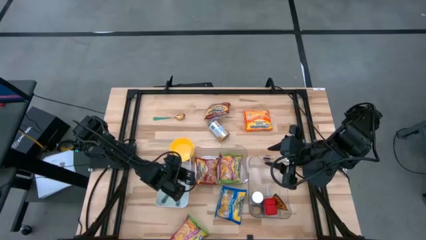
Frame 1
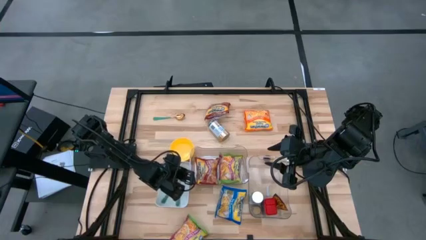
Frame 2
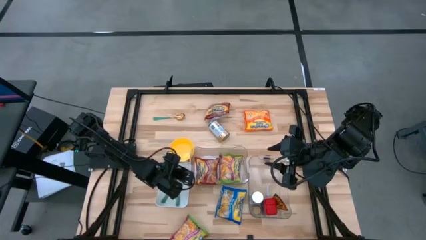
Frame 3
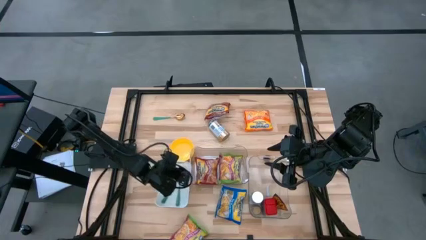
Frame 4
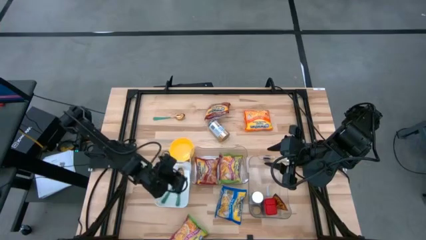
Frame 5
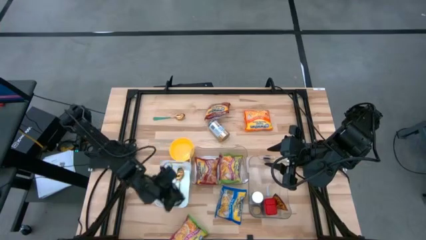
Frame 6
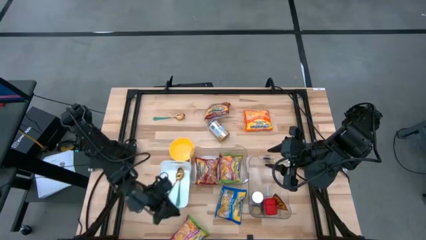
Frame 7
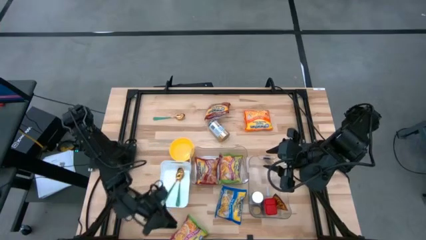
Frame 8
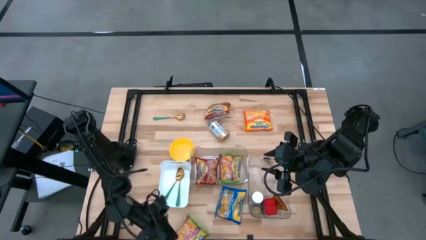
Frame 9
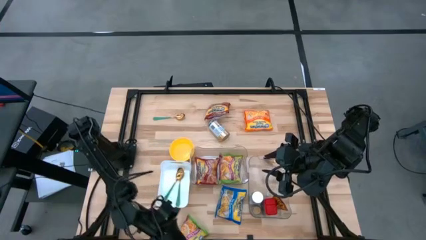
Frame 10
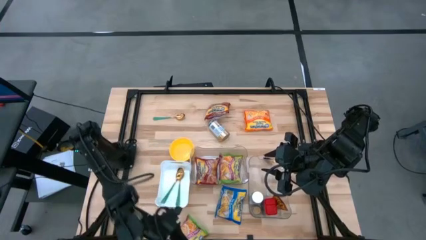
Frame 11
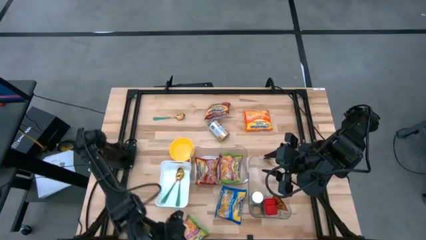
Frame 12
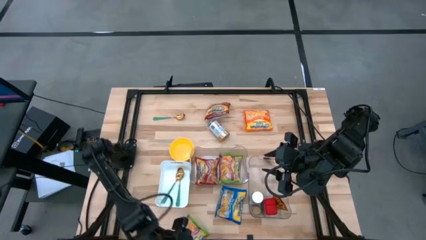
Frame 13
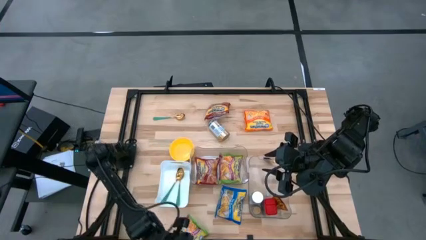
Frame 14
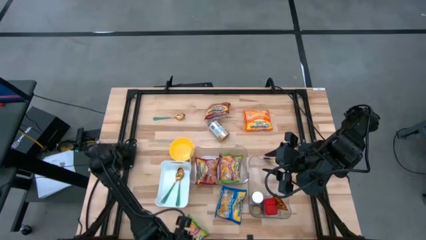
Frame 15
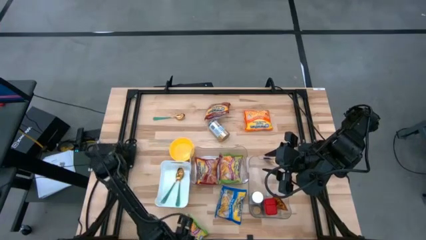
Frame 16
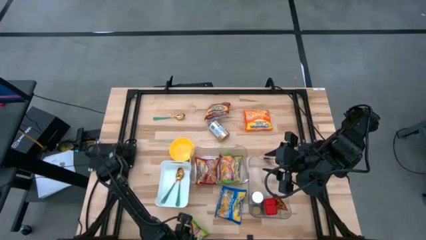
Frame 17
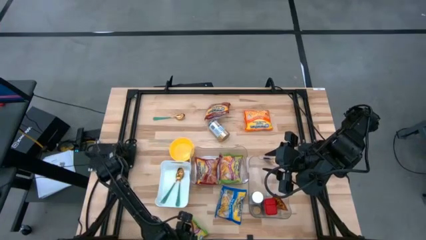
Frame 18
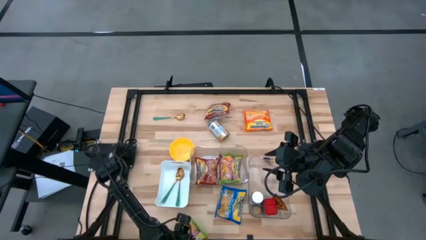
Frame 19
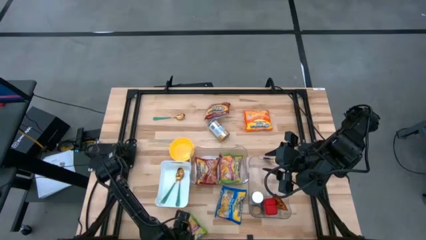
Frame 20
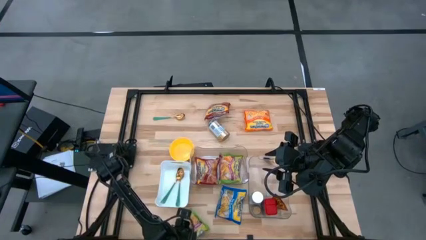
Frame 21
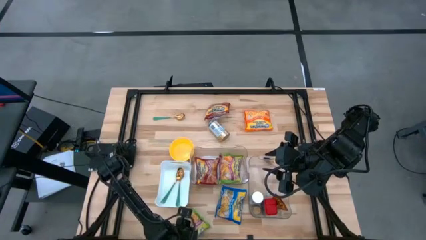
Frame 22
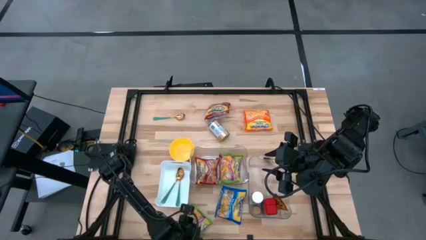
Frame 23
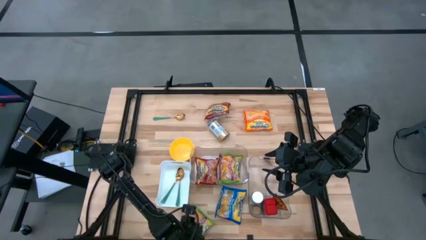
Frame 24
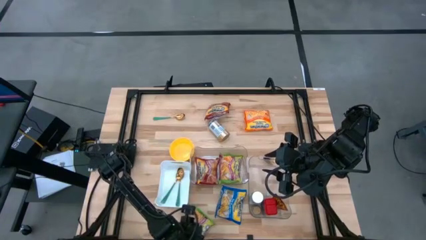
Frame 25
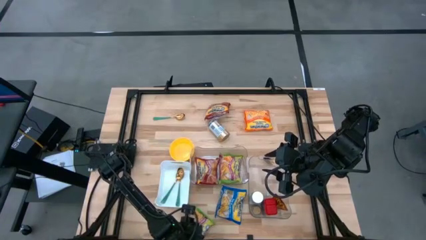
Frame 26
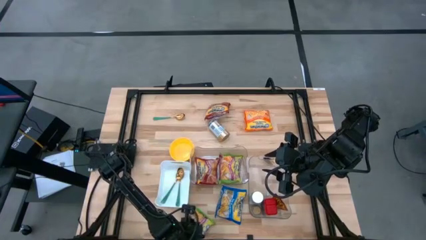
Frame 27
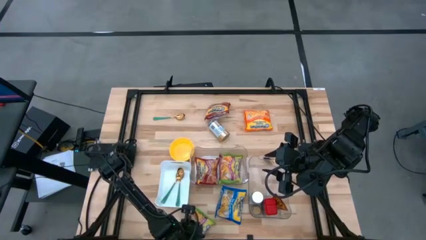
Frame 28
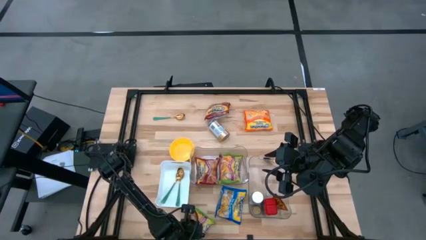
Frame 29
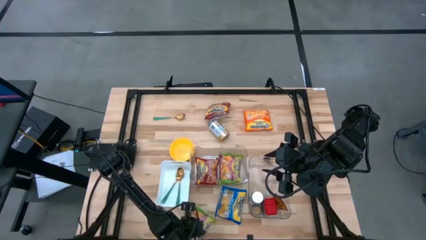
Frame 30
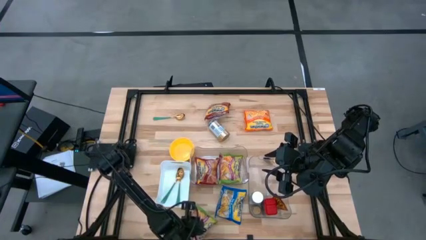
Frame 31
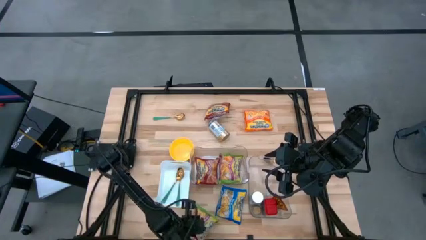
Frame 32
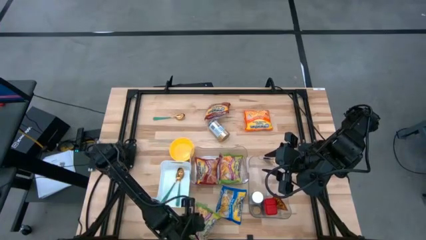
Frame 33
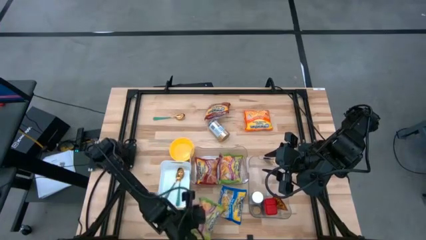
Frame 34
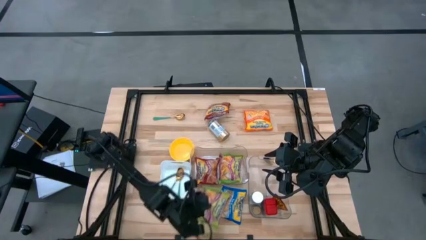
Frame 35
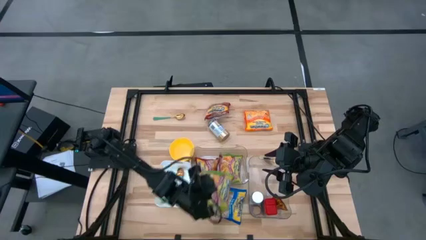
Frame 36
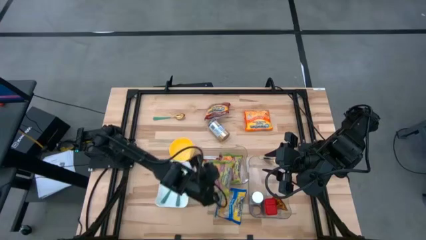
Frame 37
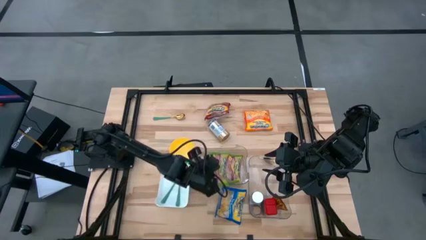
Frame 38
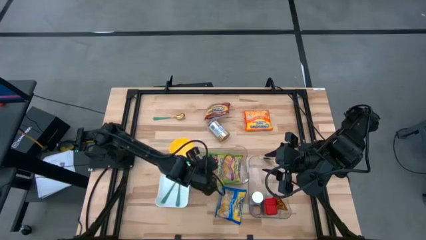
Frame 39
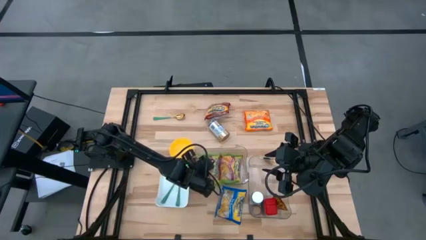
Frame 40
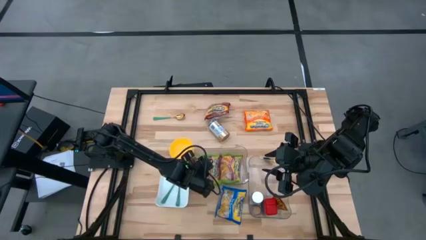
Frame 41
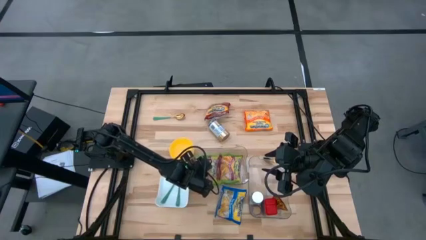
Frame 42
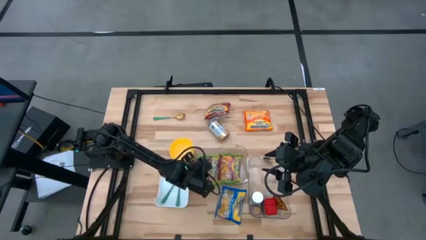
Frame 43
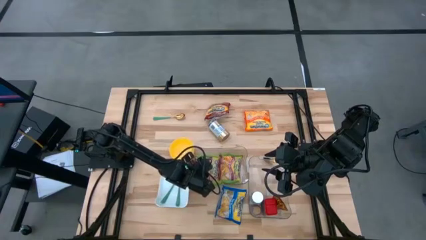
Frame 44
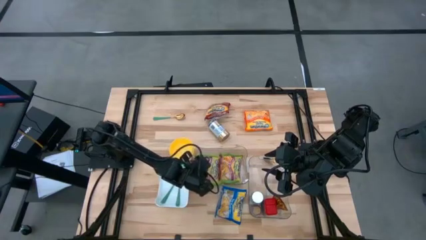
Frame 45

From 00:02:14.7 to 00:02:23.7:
Task: Pick & Place Food Item
Put the green noodle pack into the left transparent bin

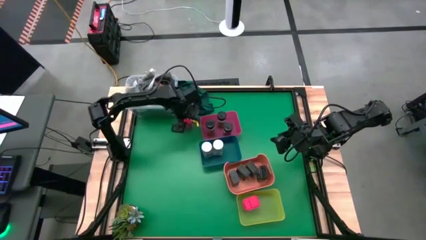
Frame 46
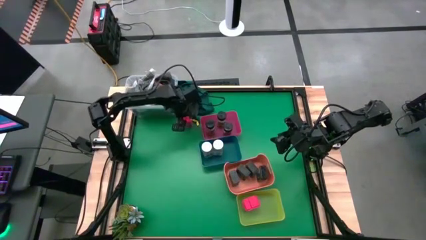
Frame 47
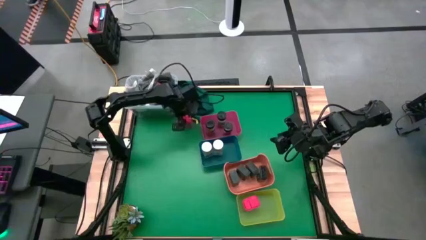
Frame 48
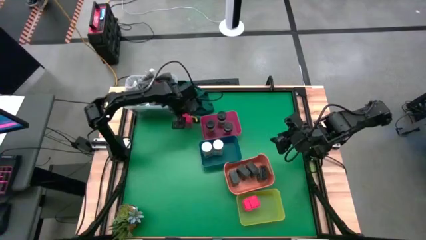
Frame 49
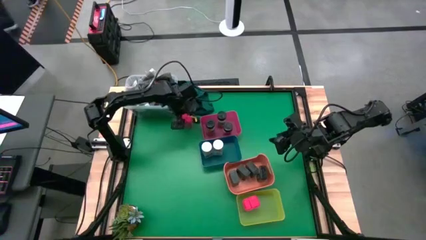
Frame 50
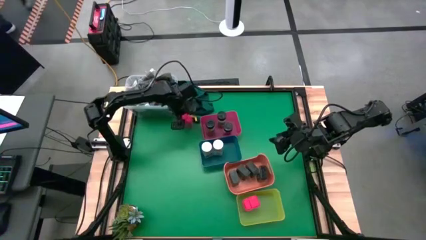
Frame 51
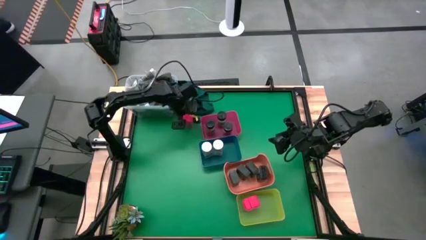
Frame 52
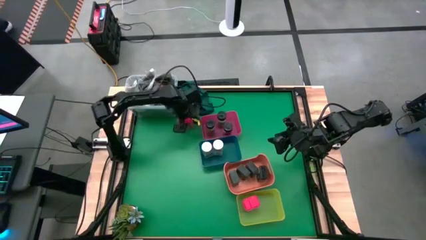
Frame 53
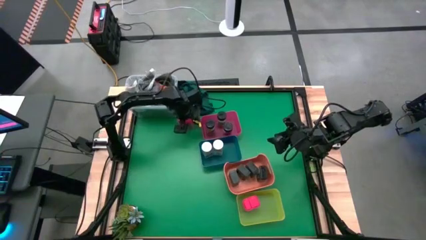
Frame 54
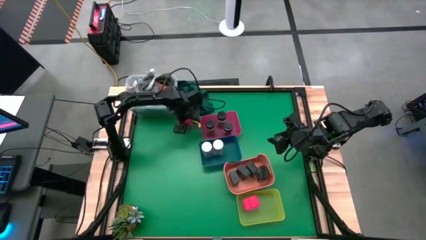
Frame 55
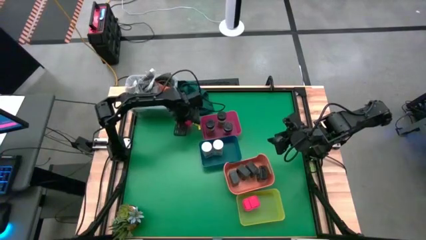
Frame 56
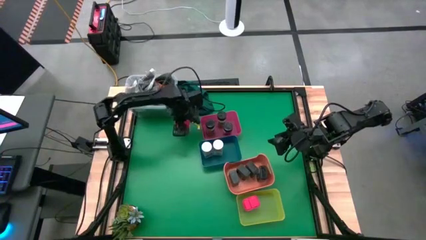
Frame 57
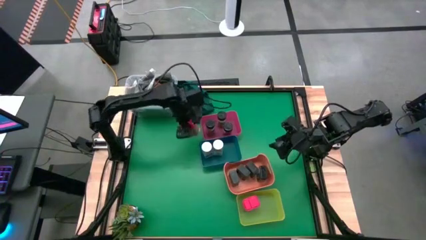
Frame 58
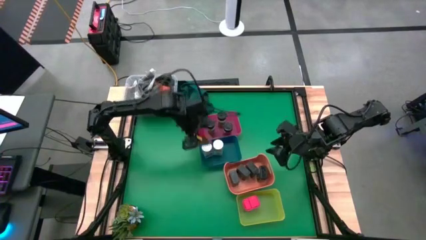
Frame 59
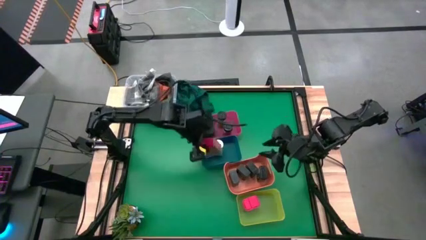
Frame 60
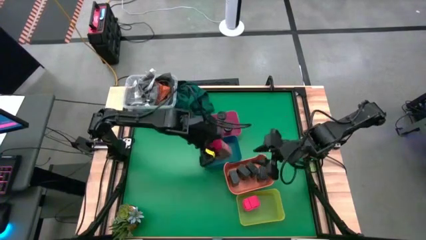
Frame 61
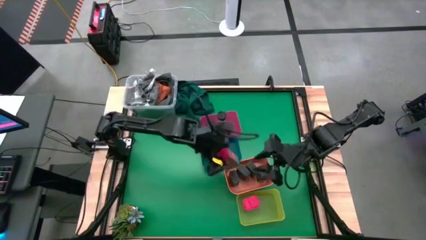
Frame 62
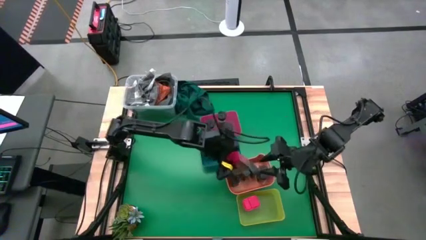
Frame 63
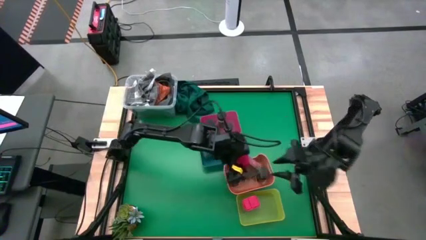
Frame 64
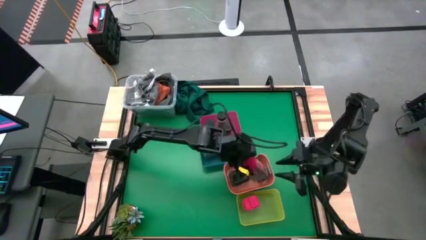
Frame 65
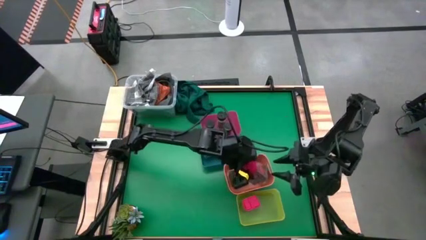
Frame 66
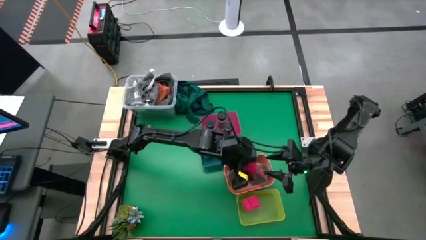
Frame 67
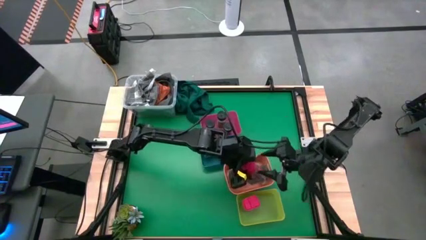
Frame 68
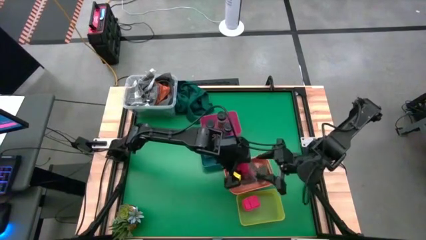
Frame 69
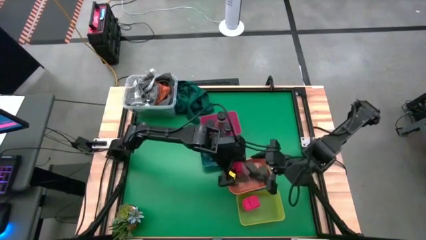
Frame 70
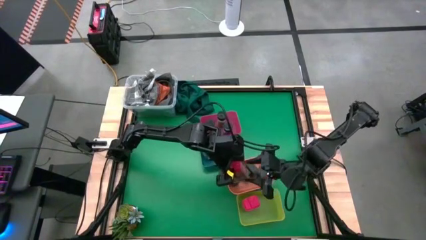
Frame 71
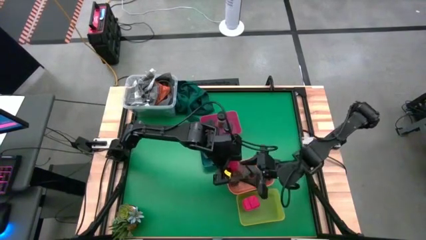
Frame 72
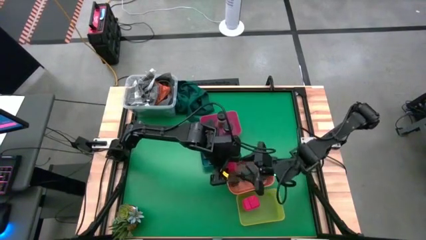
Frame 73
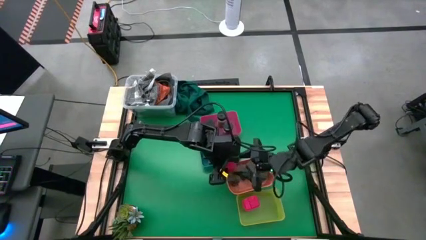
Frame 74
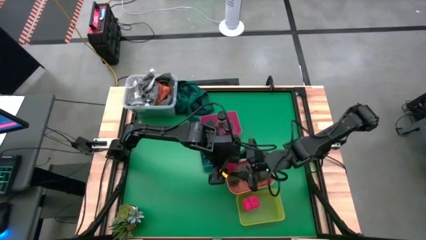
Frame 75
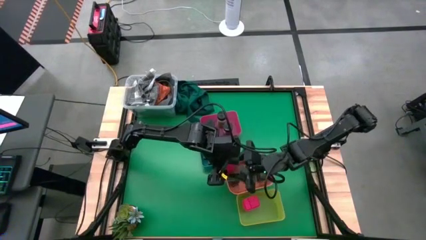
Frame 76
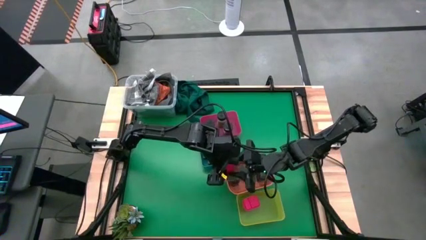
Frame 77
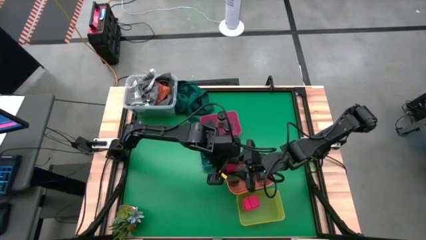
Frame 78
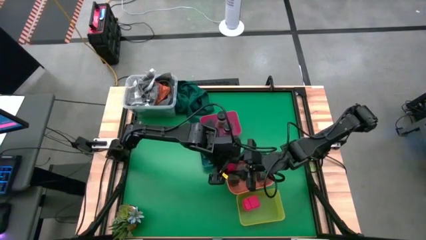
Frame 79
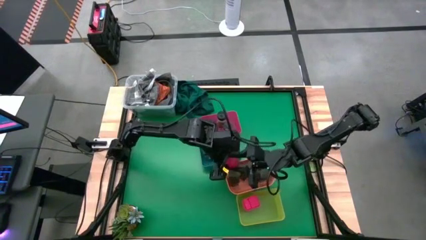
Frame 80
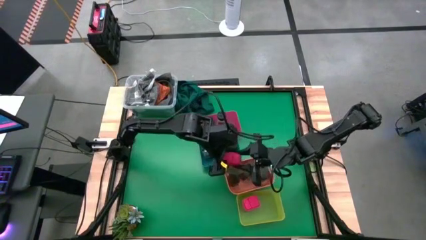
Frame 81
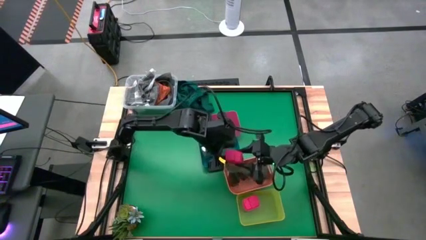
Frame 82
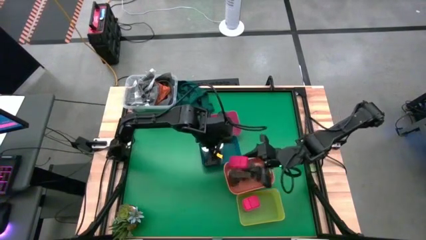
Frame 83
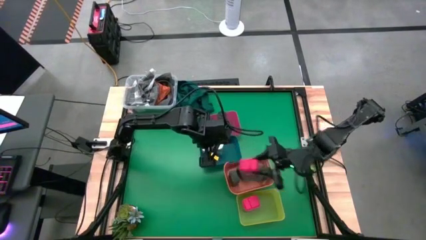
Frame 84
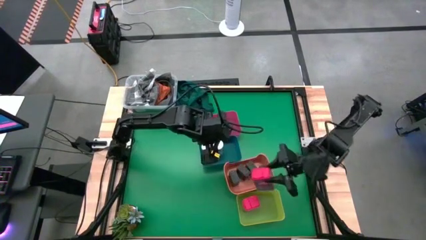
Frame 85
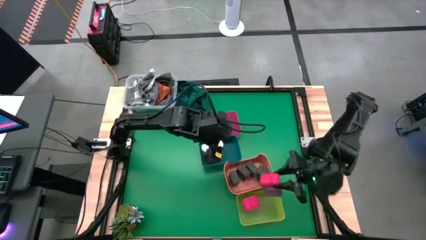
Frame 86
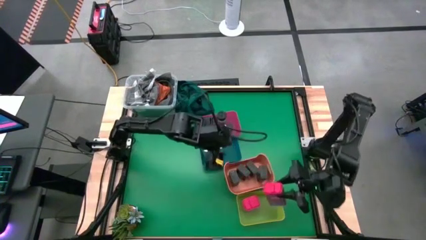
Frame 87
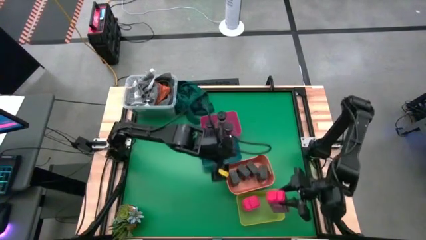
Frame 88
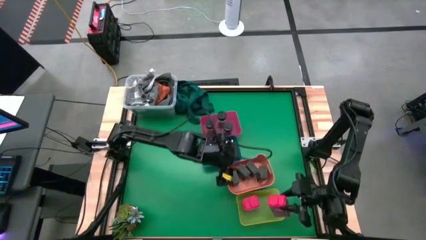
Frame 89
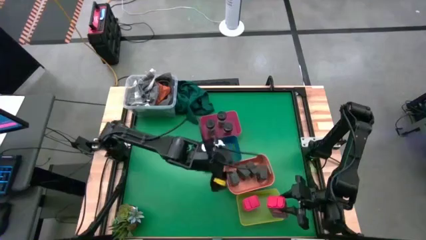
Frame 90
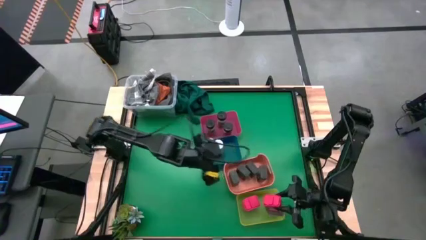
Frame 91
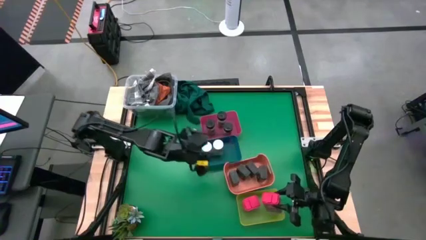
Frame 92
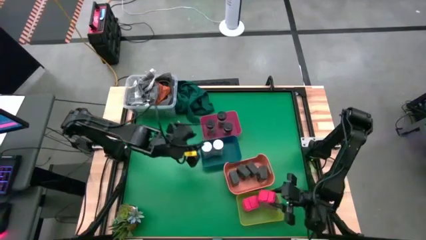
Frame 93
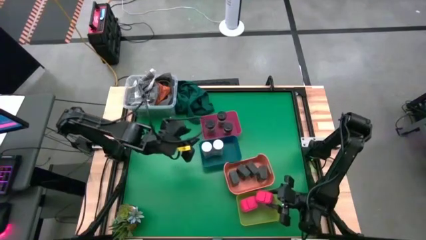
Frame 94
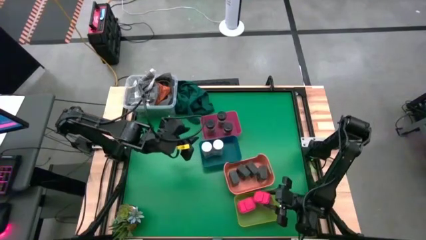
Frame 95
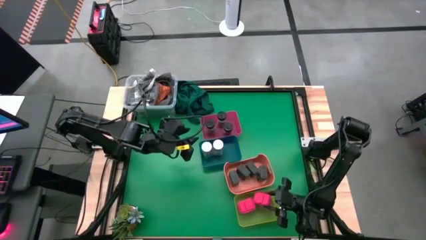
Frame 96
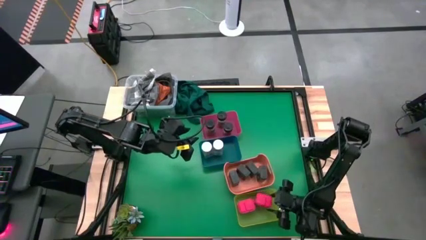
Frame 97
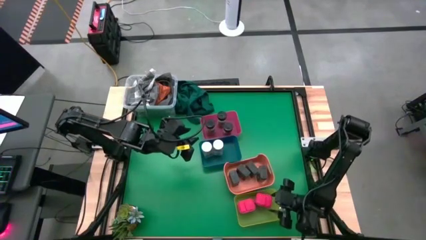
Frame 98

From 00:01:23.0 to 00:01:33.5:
Task: Sort spices by type
Put the red seasoning can into the yellow bin
